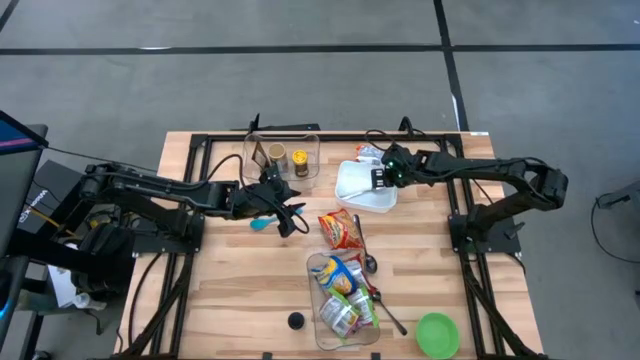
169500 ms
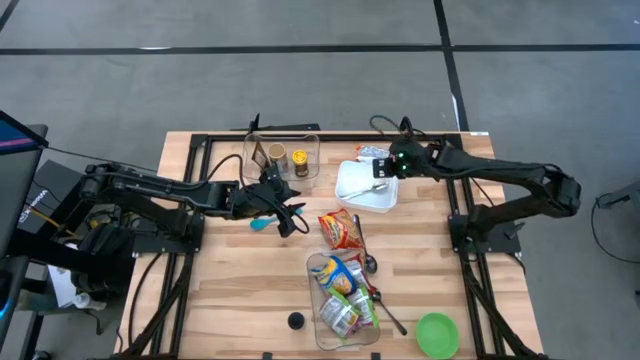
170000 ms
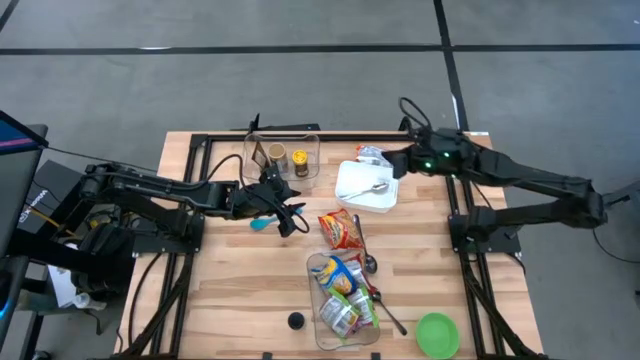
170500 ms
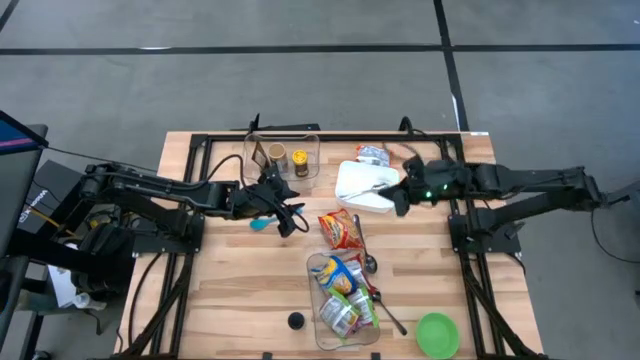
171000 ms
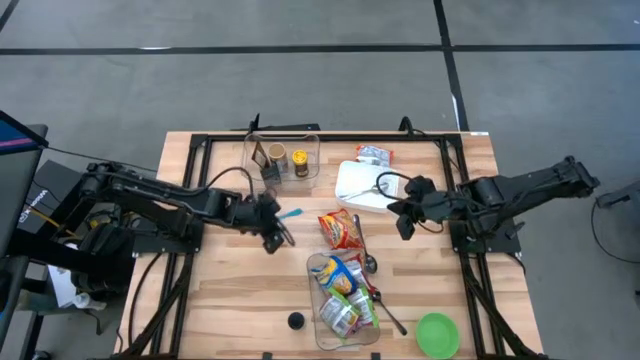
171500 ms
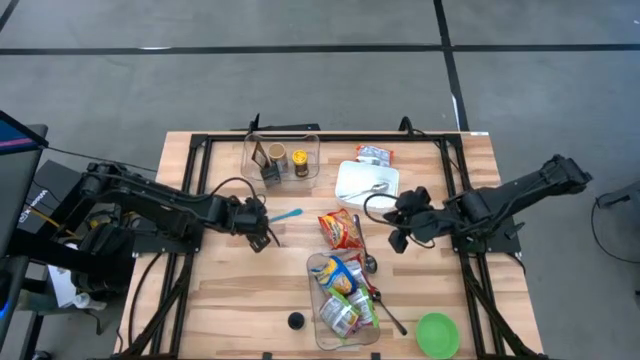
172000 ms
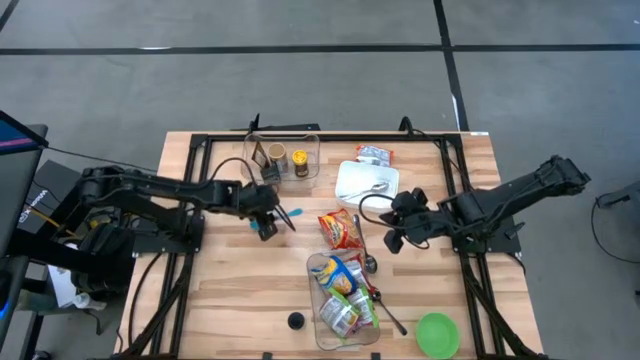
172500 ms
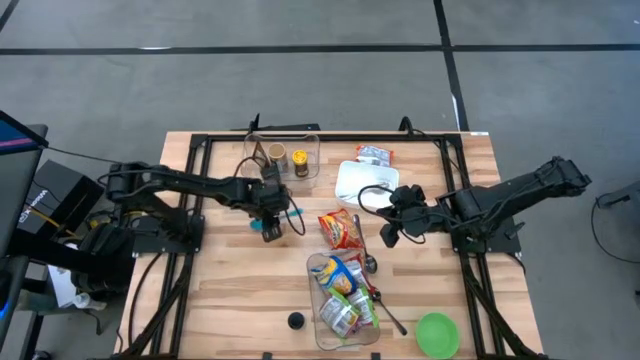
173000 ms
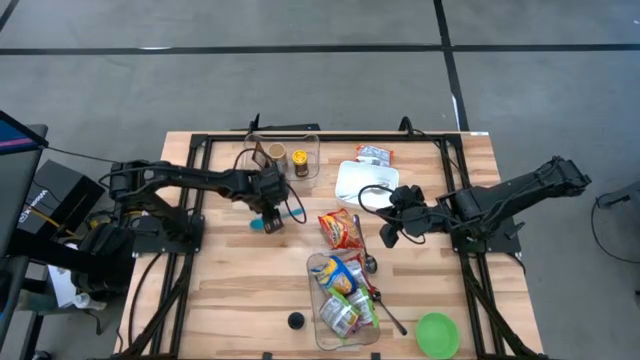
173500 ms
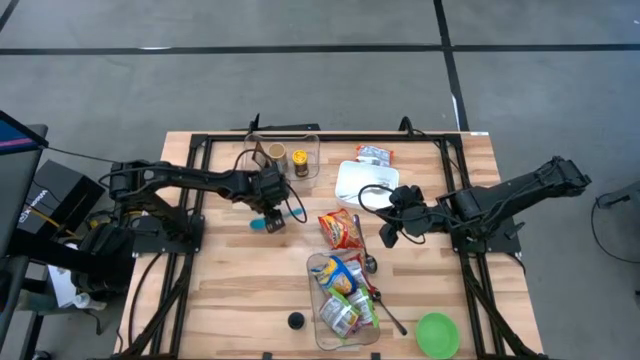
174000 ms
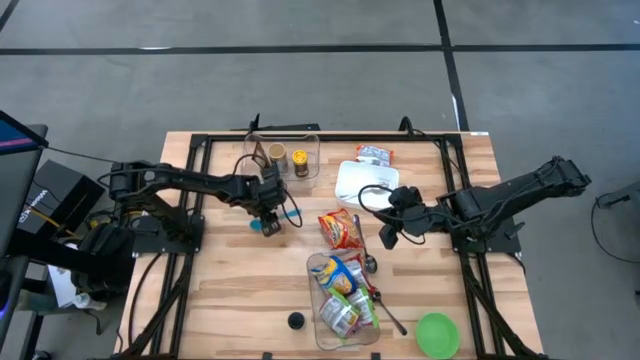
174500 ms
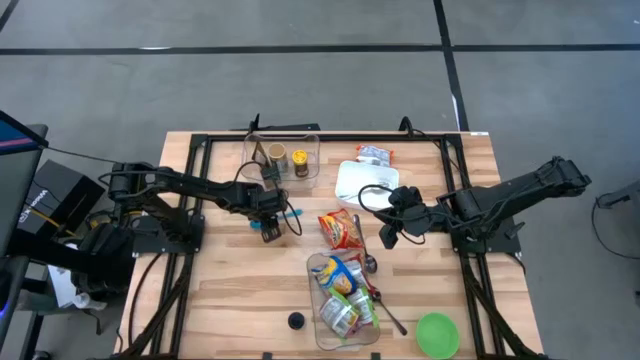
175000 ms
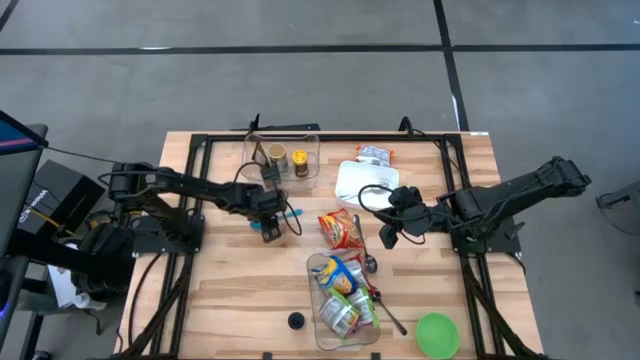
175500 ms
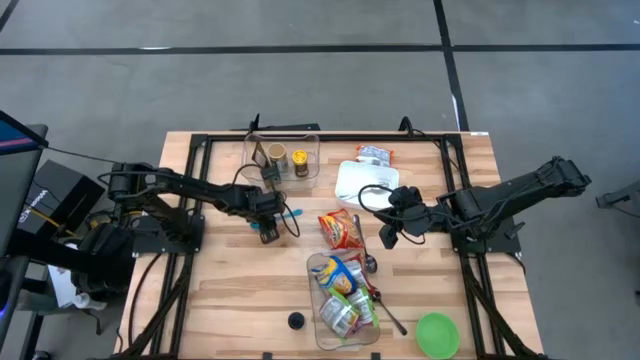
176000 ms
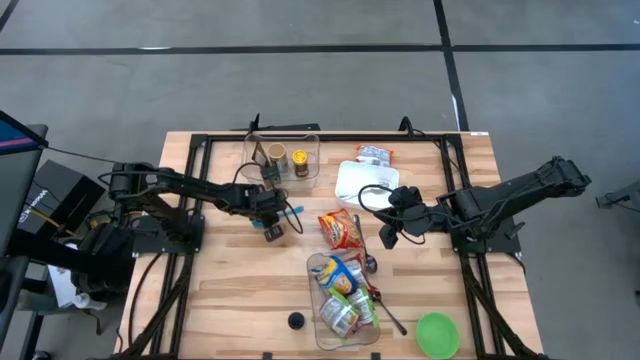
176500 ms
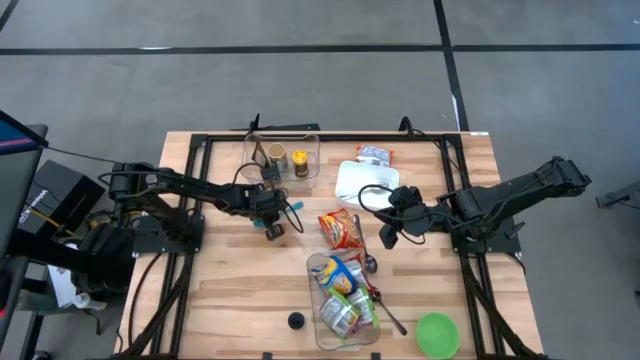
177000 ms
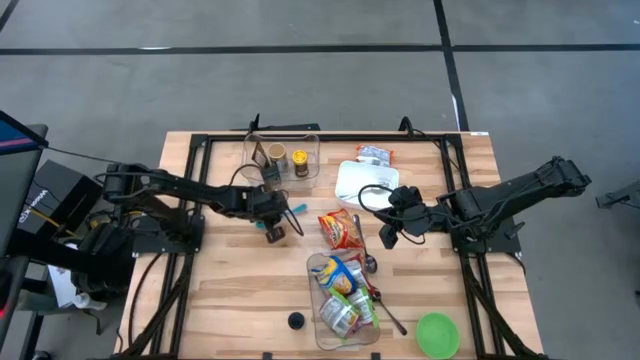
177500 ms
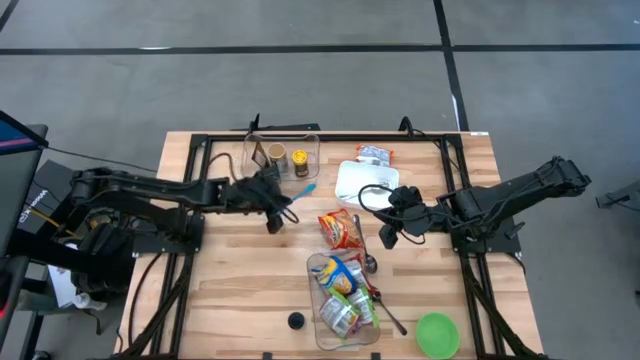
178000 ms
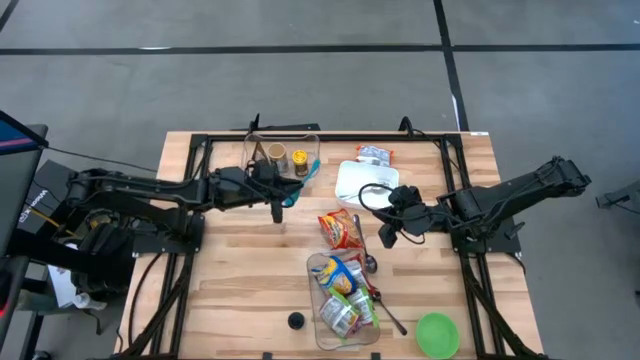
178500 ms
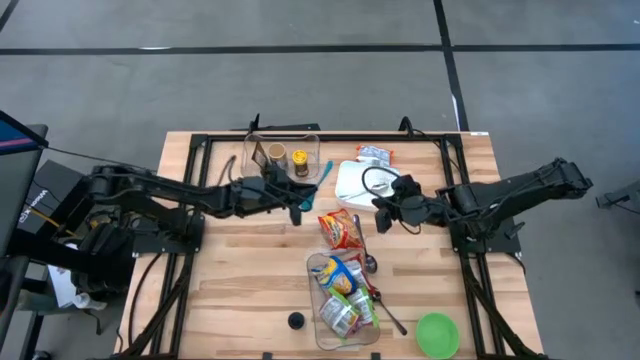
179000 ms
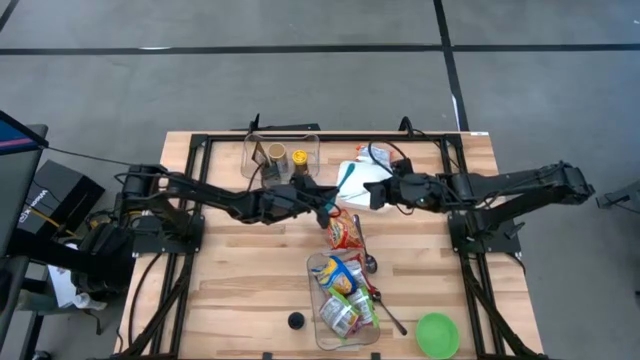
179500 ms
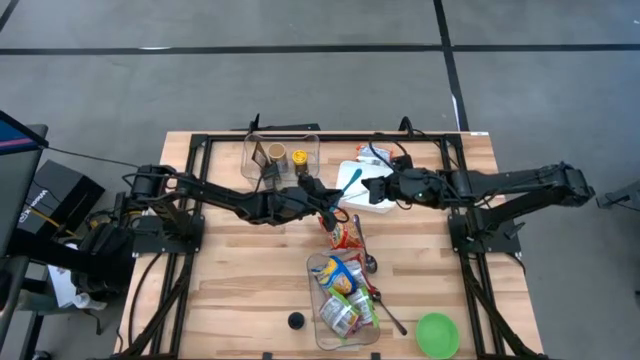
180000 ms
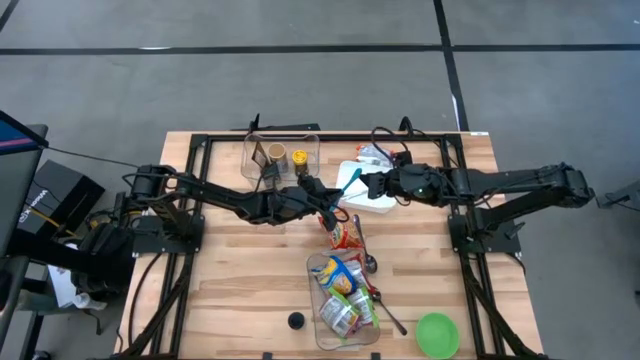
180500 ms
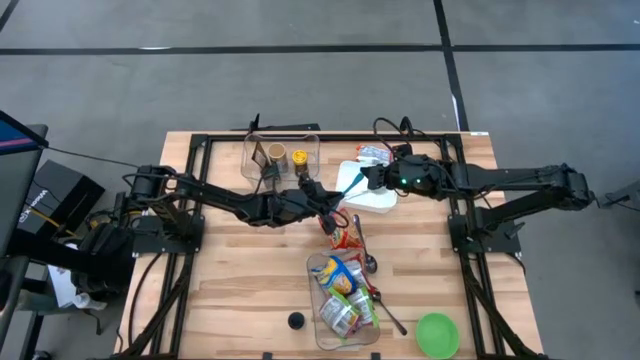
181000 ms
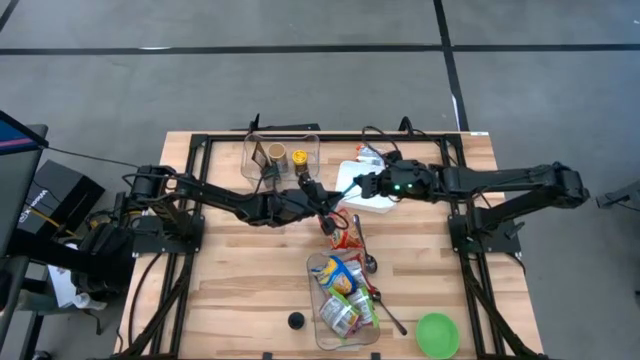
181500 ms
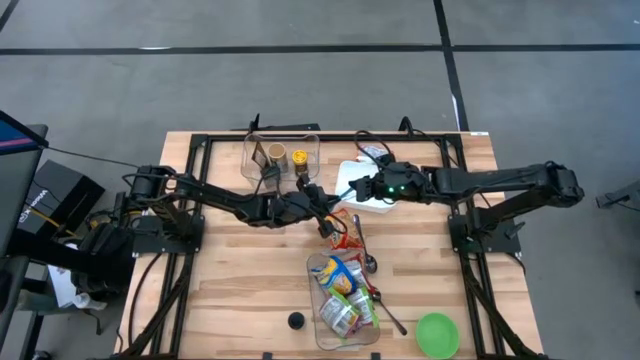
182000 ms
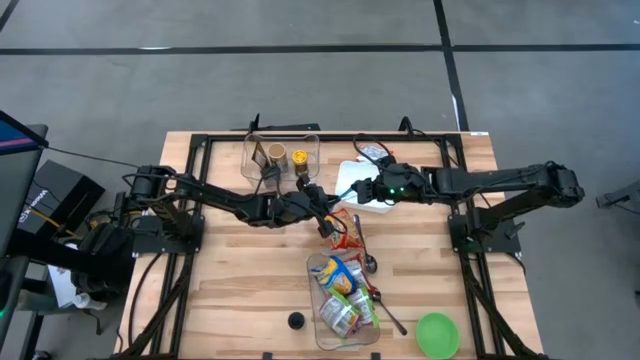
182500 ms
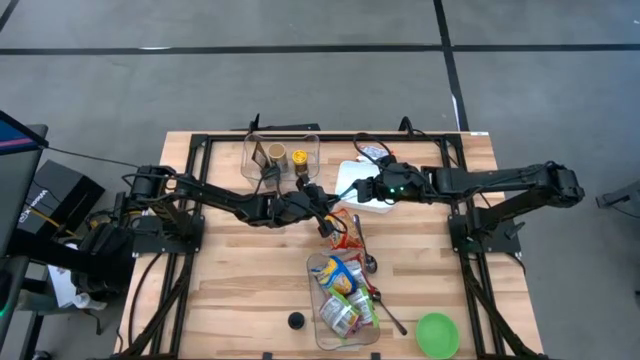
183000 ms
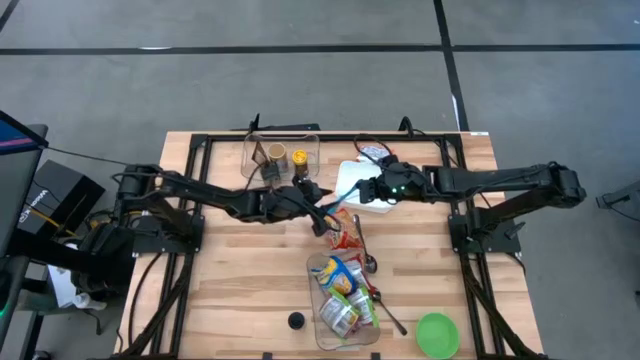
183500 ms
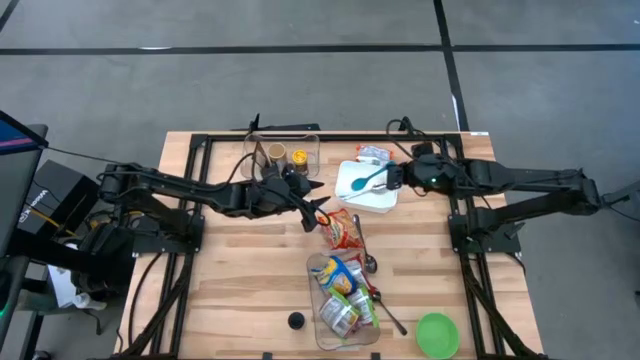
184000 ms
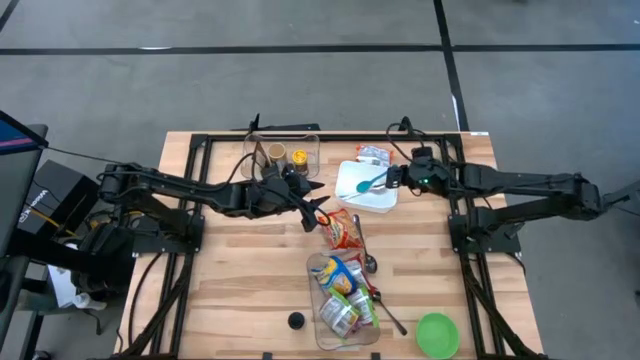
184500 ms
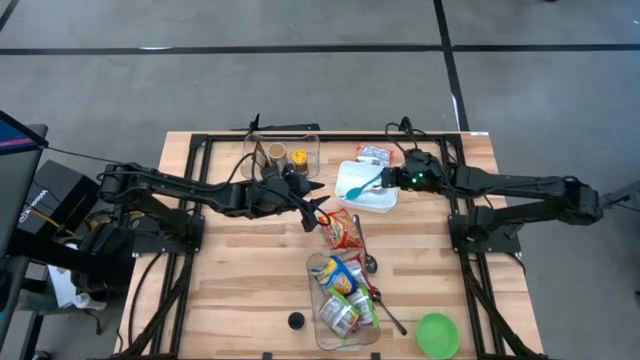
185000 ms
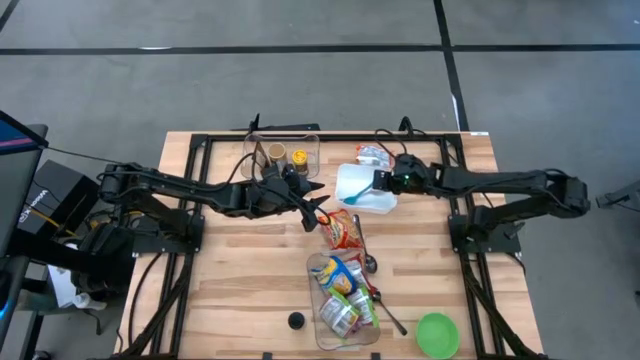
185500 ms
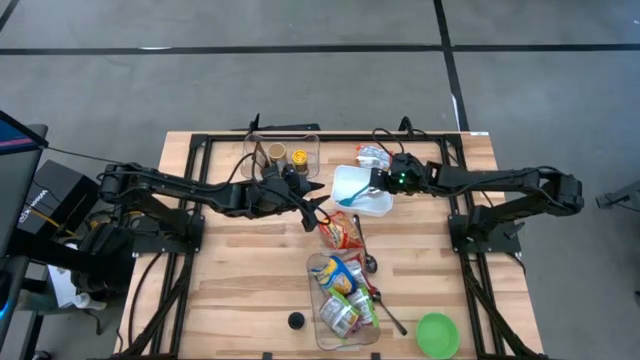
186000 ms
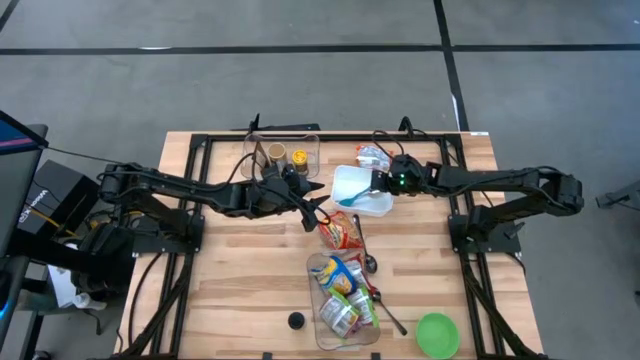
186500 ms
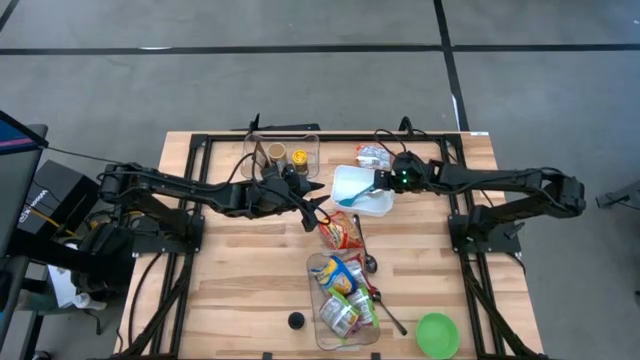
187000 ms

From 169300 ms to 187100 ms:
Task: Pick & Place Food Item
Put the blue spoon into the white bin

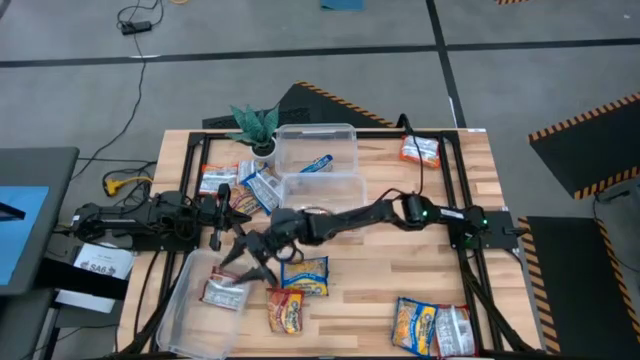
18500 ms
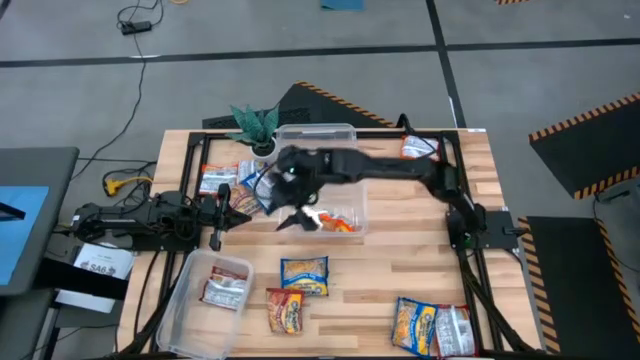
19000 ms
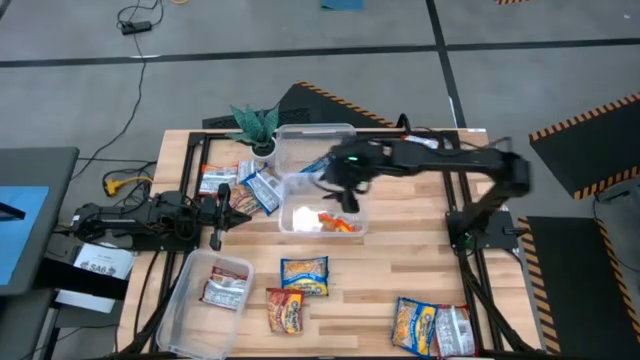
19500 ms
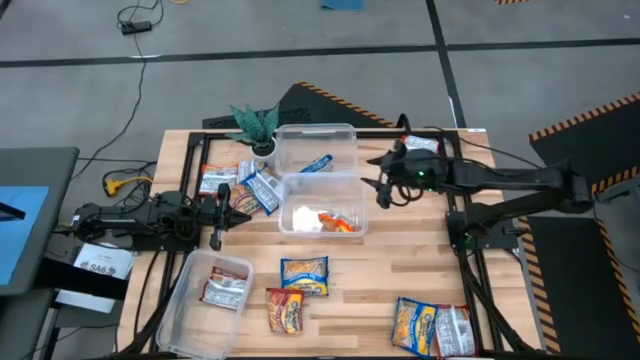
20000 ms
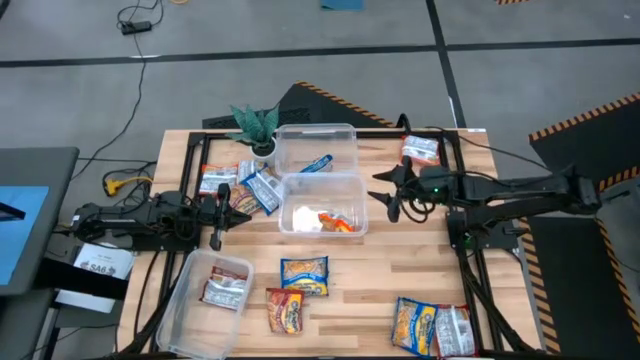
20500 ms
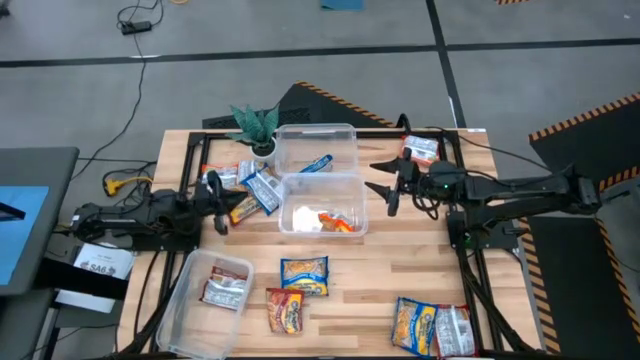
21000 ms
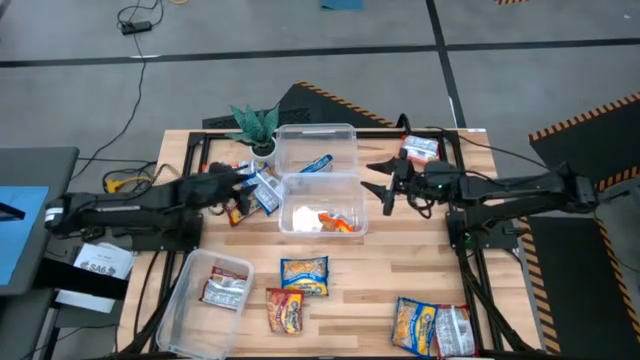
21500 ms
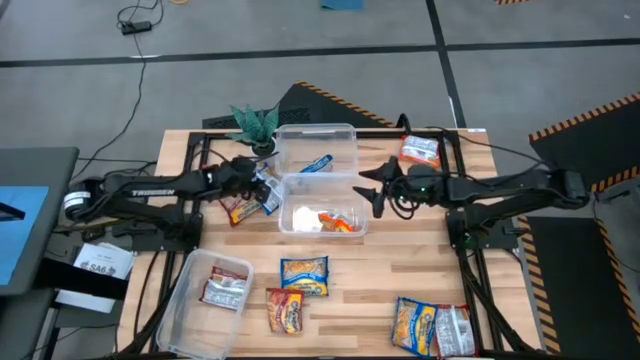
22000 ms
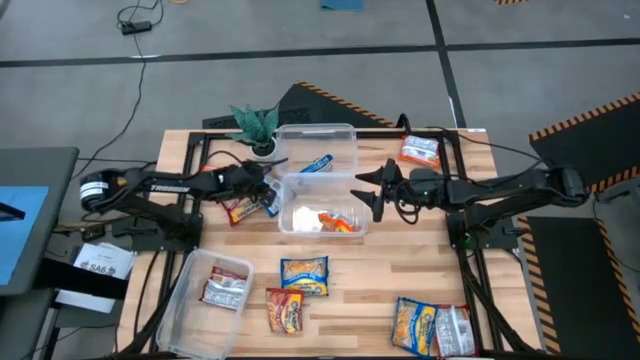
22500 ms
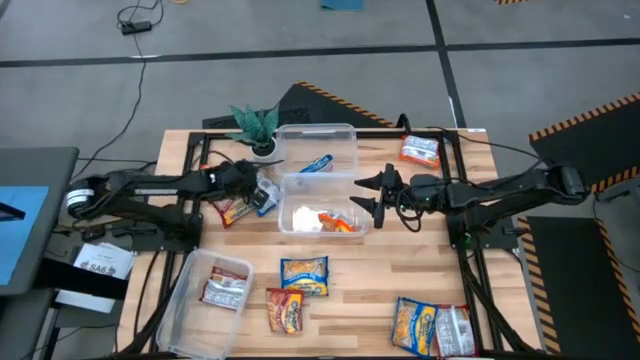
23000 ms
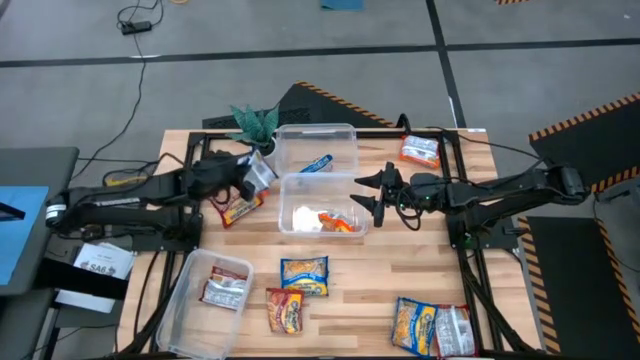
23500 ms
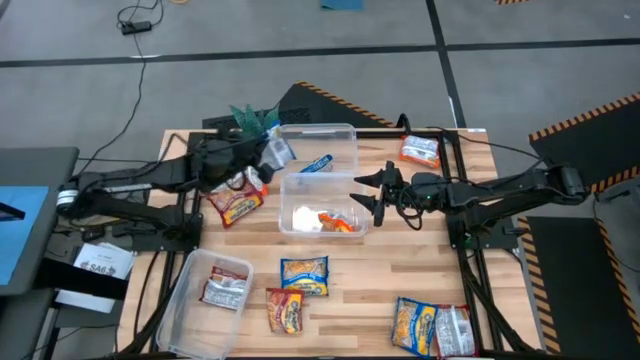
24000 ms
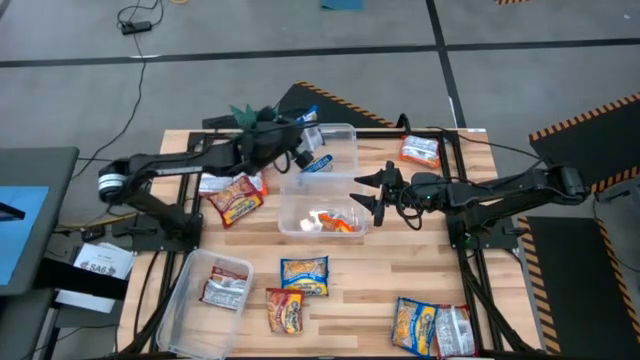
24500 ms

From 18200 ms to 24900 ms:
Task: Sort Maruchan noodles
Put the blue noodle pack into the top transparent bin
